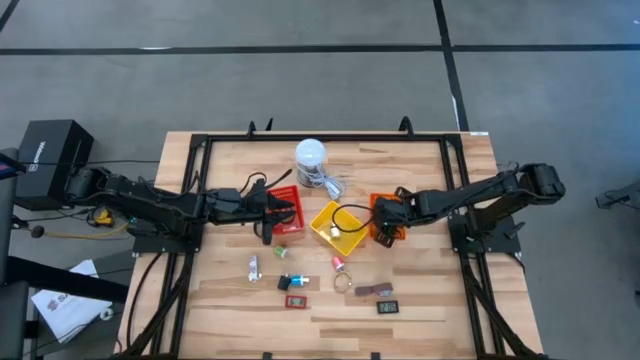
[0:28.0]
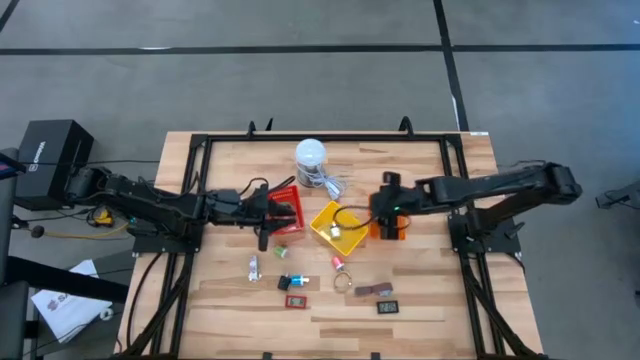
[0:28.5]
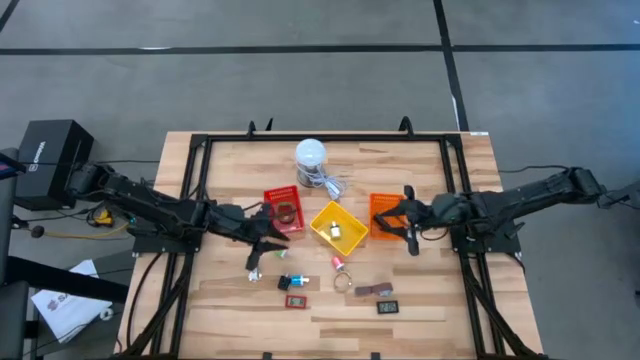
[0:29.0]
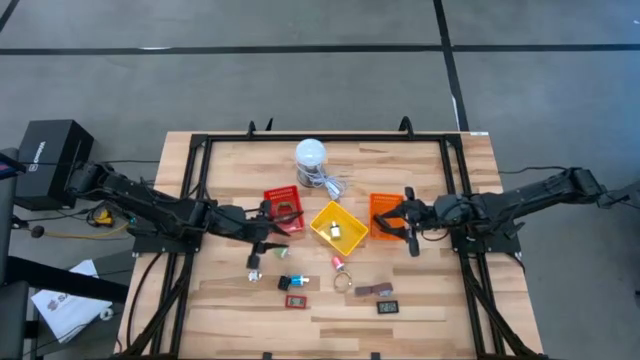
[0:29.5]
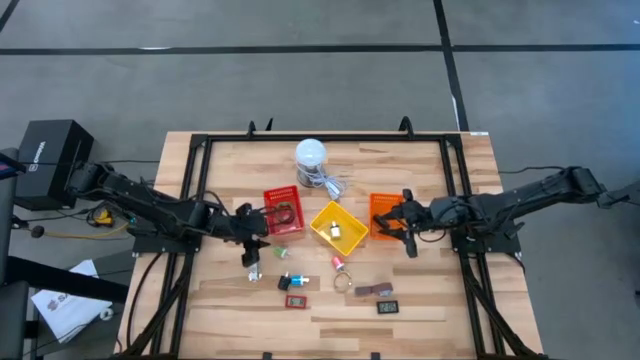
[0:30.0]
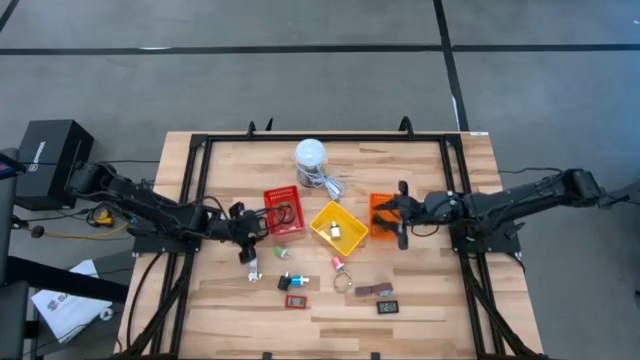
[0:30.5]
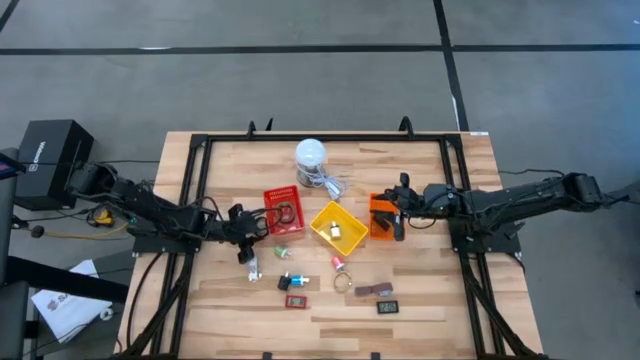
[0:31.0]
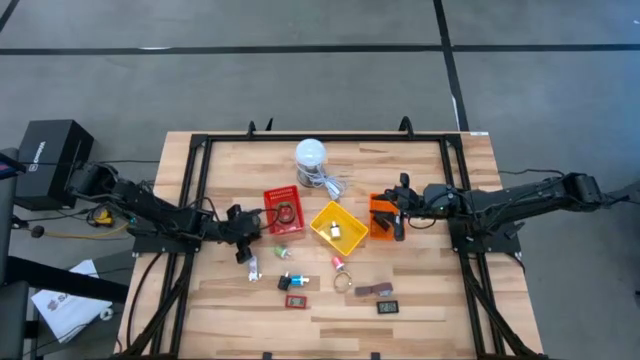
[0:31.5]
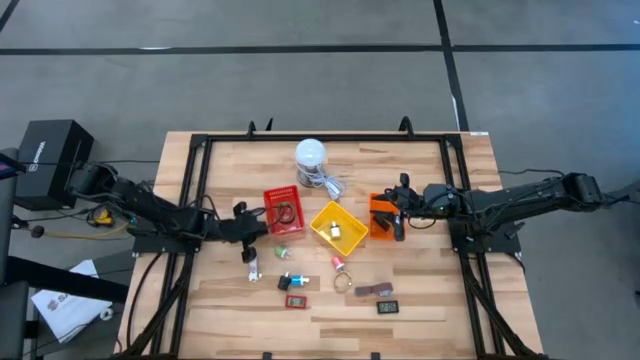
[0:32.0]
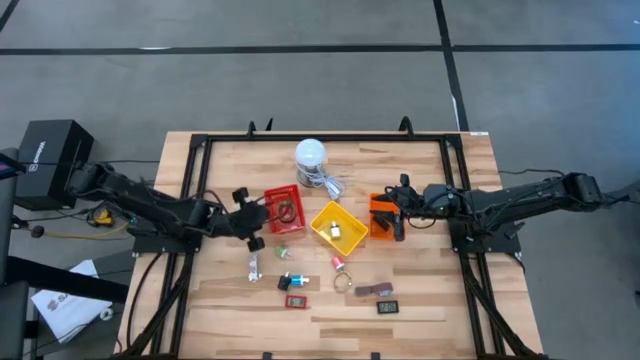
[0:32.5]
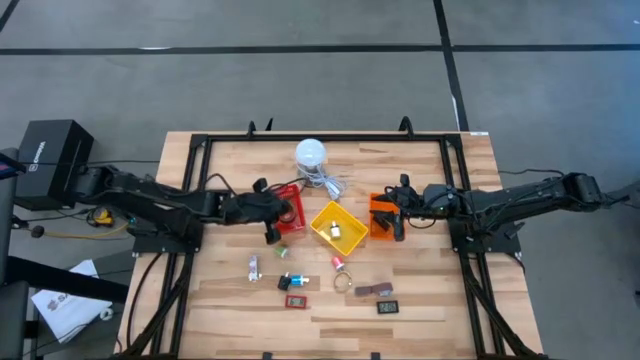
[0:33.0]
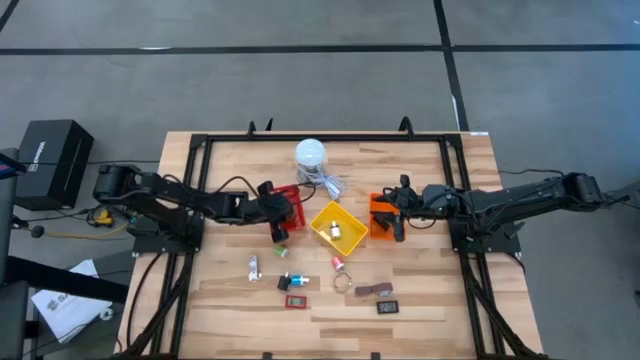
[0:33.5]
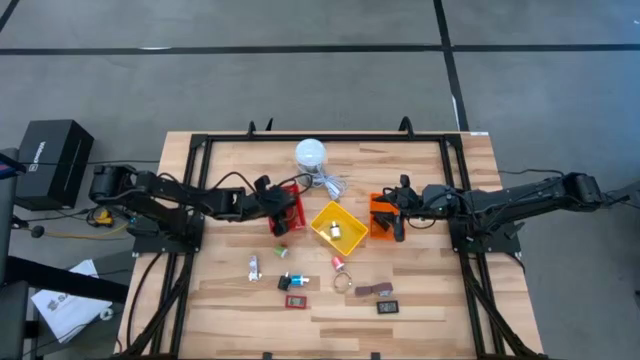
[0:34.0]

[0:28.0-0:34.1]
Task: Pick & Place Office items
Put the black watch into the red basket

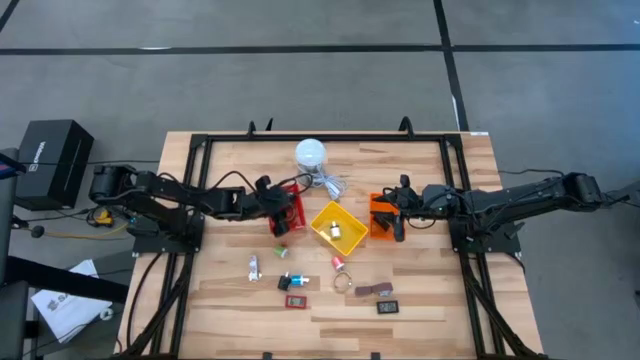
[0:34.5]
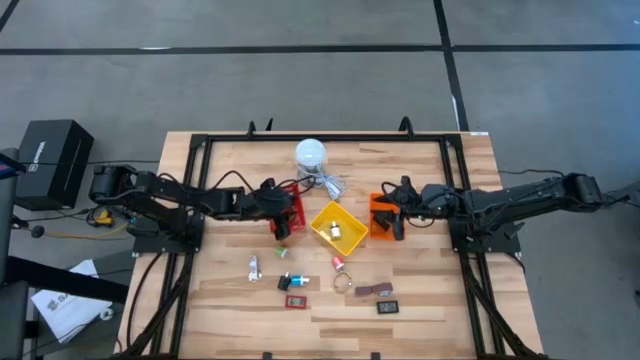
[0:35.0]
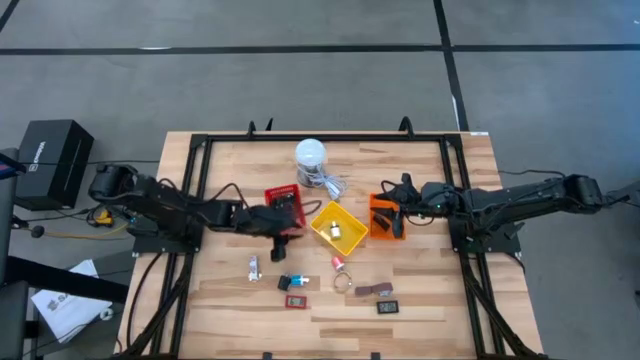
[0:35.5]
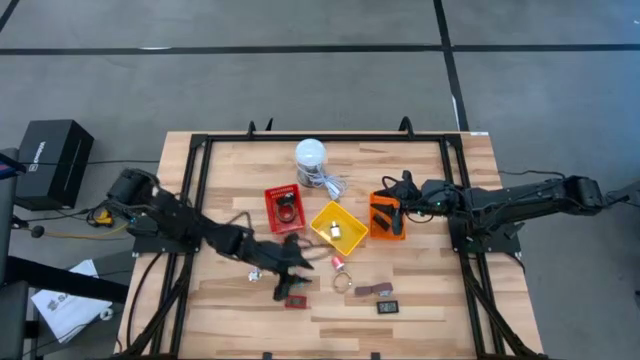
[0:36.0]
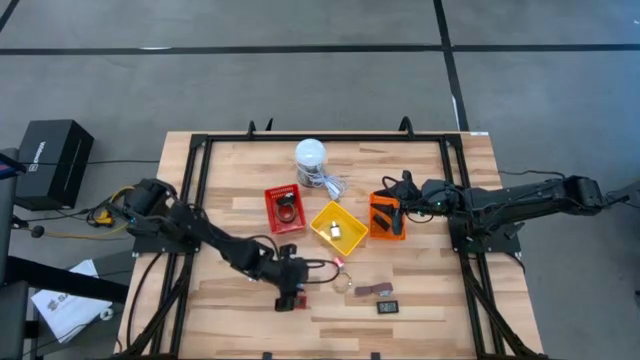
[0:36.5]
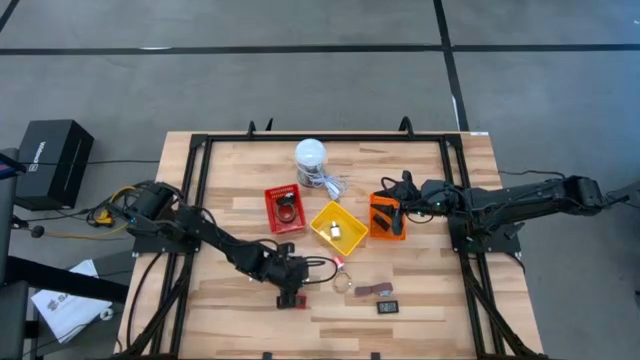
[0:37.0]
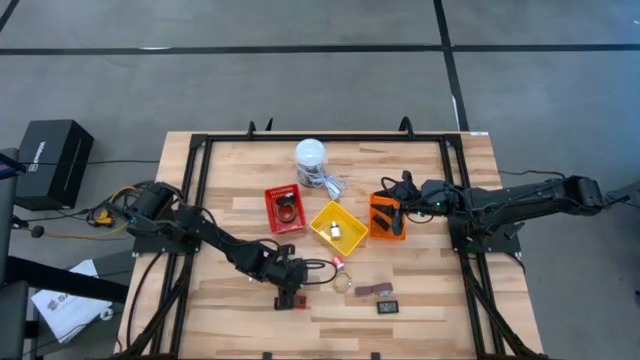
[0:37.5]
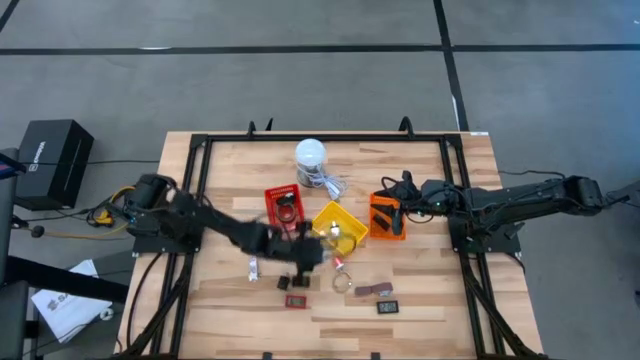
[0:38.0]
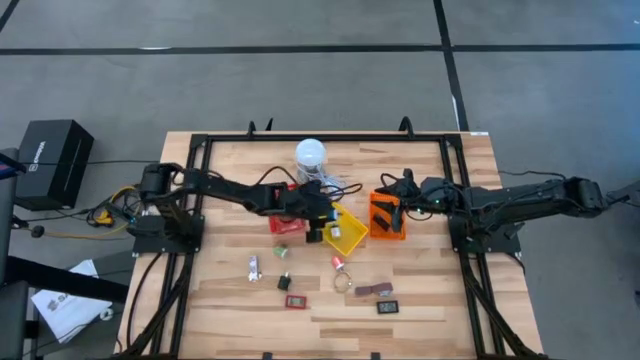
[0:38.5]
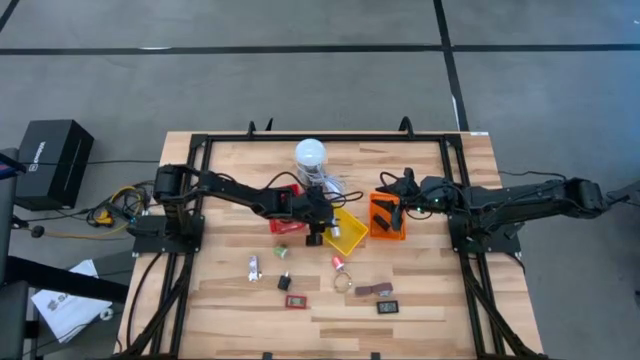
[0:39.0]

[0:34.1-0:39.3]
Put the blue charger adapter into the yellow basket

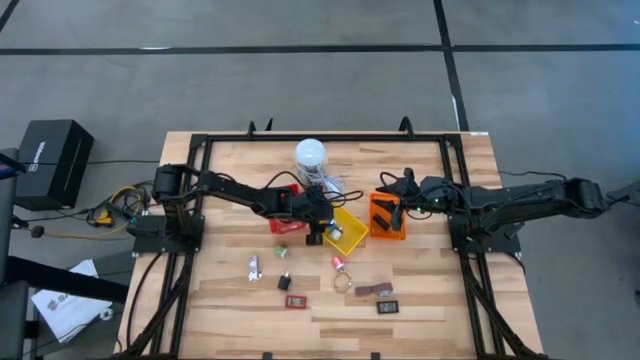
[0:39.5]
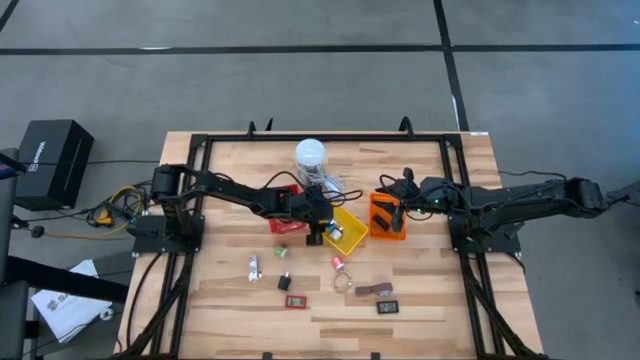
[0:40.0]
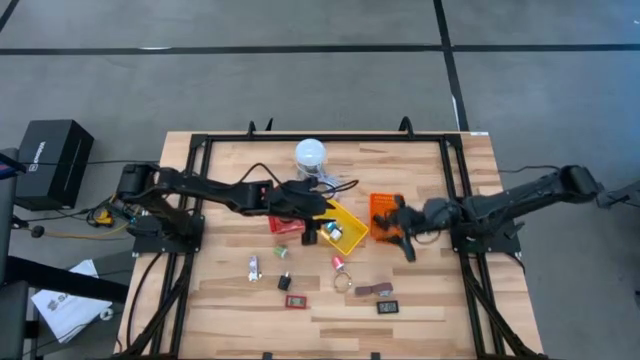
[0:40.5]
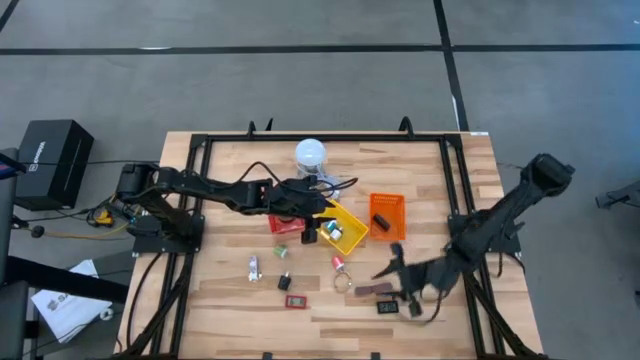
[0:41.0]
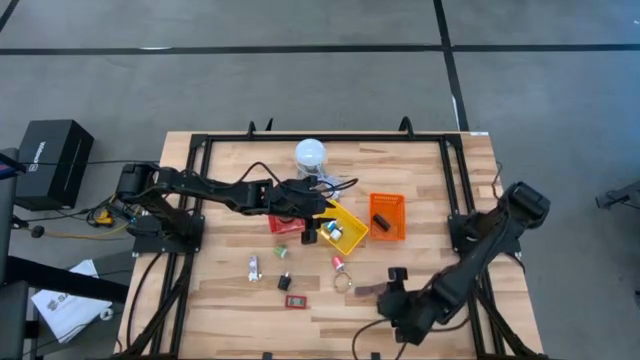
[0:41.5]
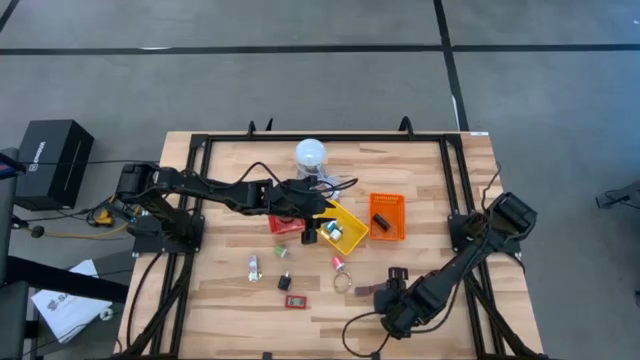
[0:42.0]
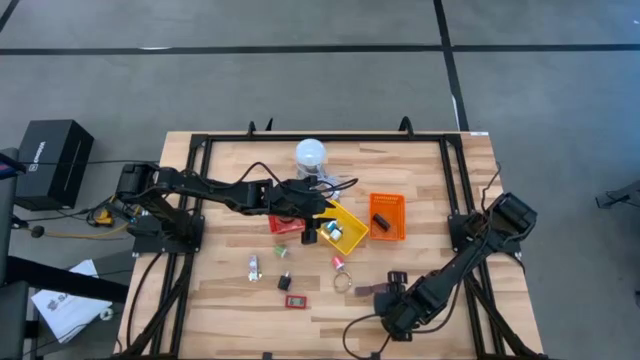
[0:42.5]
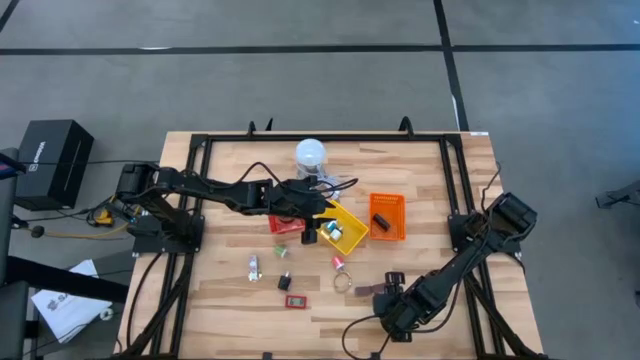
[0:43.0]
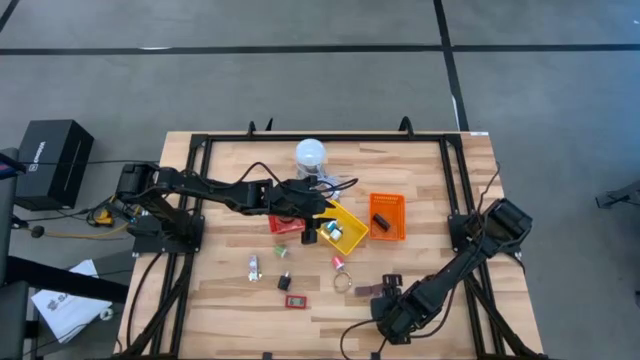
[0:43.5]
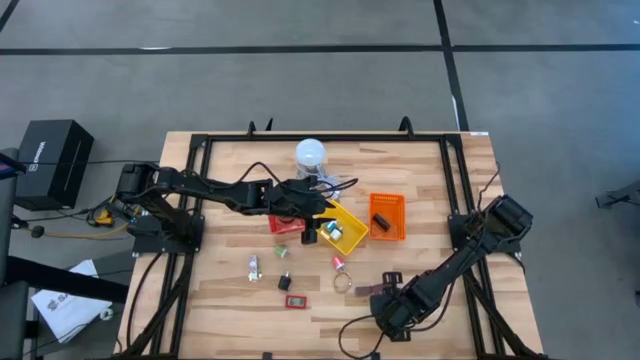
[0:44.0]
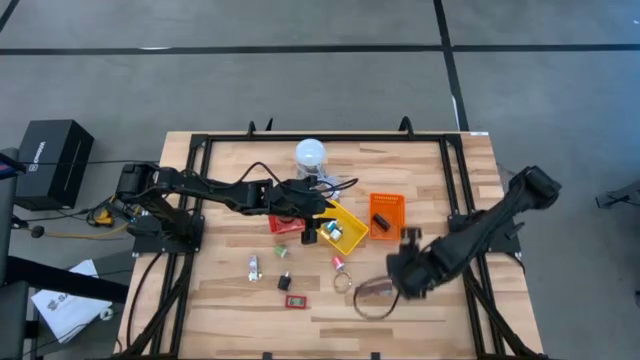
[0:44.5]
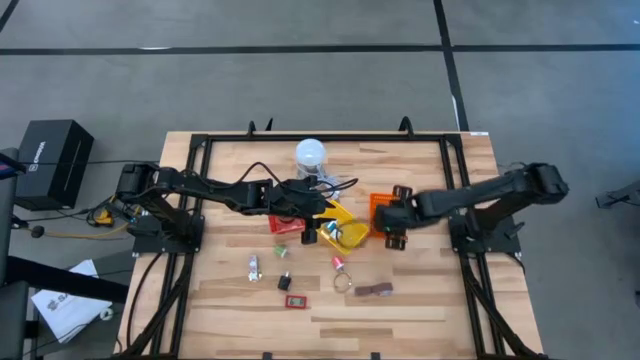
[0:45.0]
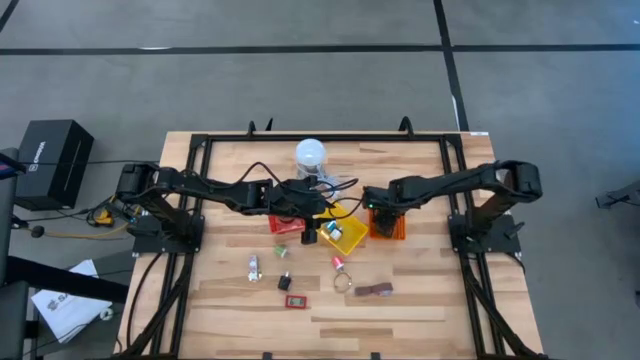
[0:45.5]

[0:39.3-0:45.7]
Put the black digital clock into the orange basket

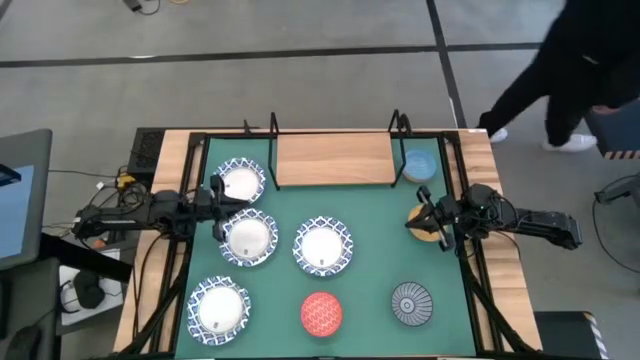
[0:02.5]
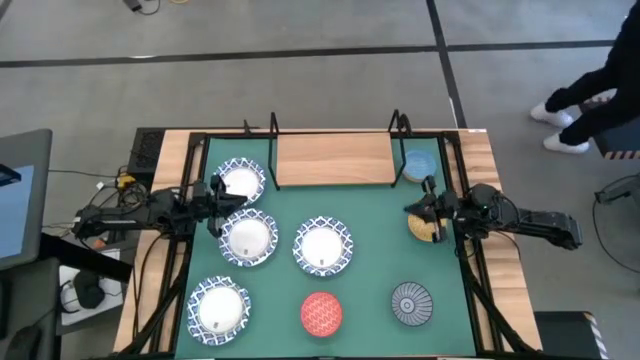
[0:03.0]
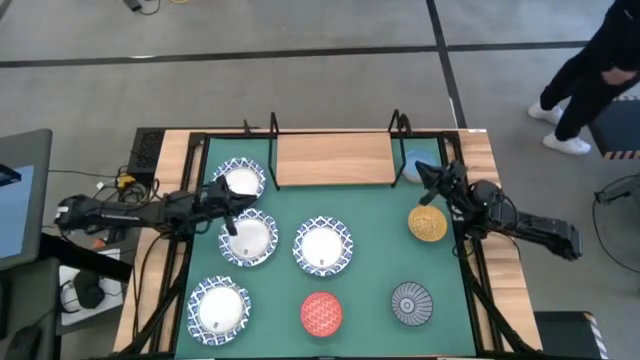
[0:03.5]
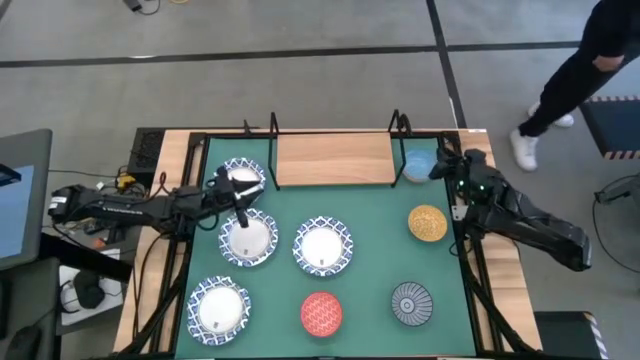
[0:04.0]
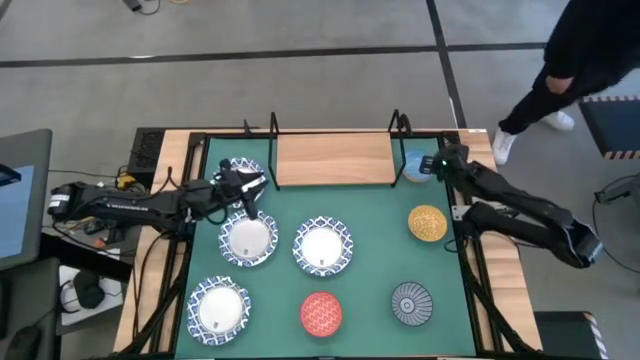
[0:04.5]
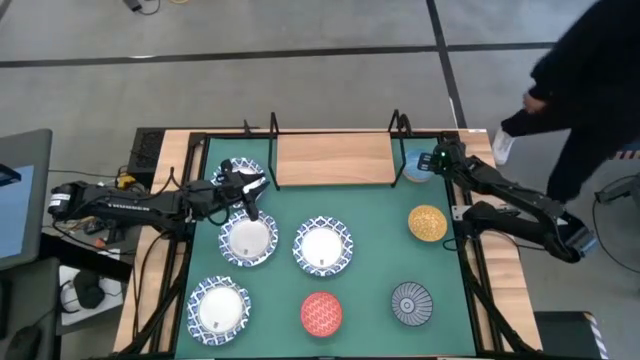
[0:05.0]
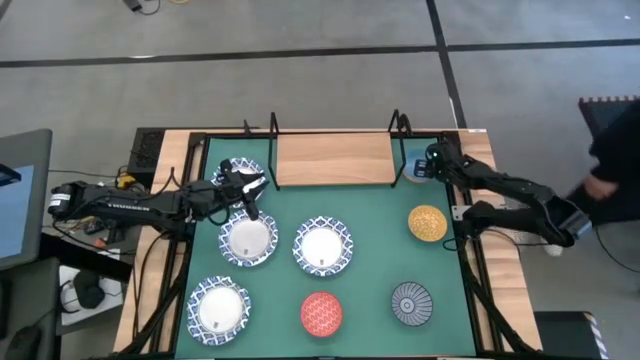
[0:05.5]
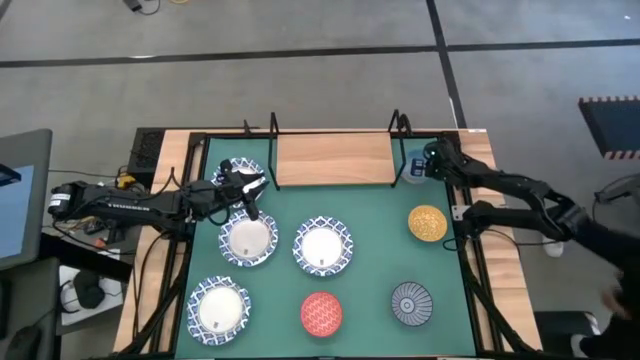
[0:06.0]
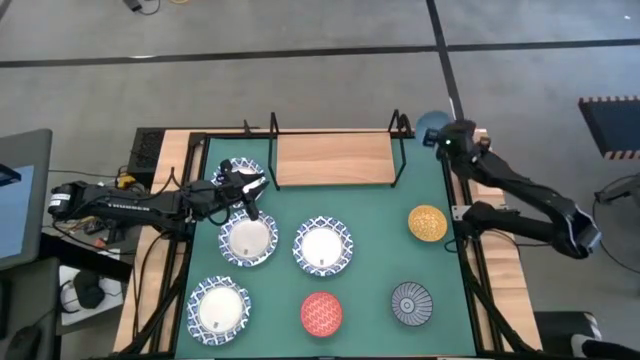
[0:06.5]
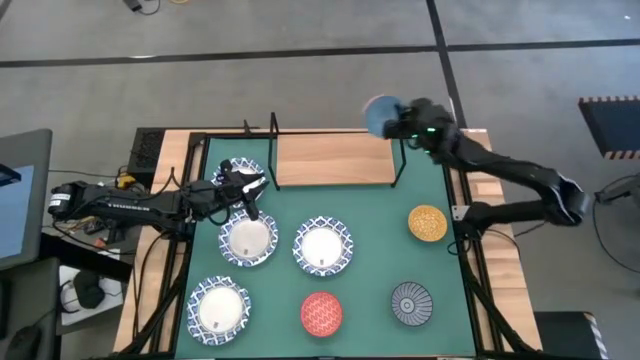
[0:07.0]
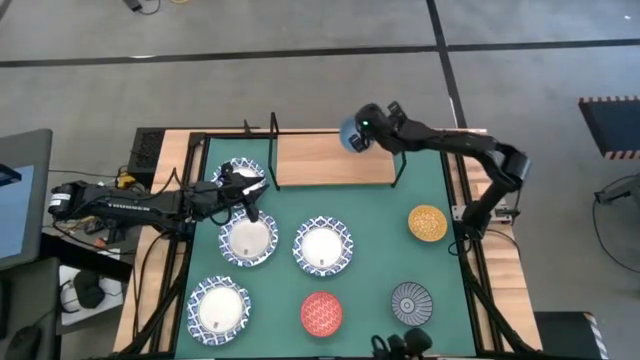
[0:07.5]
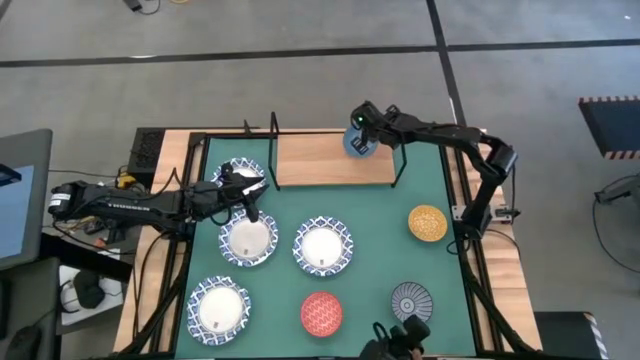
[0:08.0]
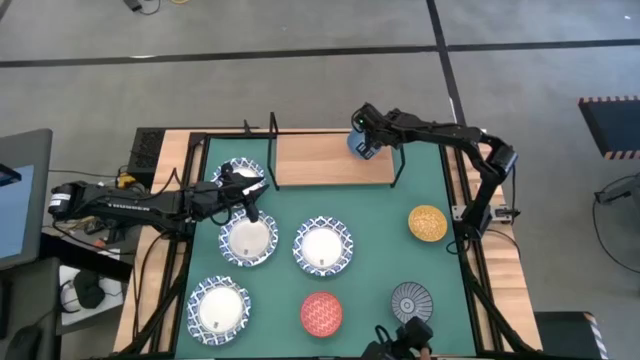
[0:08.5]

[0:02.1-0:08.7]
Task: Place and stack bowls onto a shelf
Put the blue ceramic bowl on the shelf
